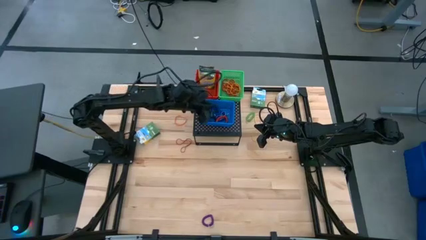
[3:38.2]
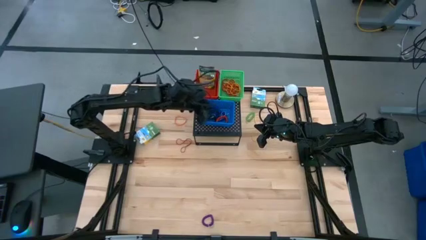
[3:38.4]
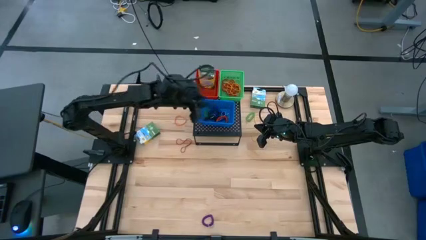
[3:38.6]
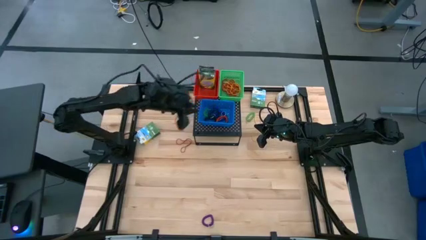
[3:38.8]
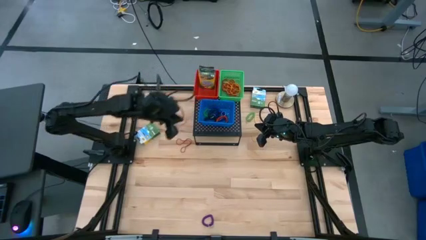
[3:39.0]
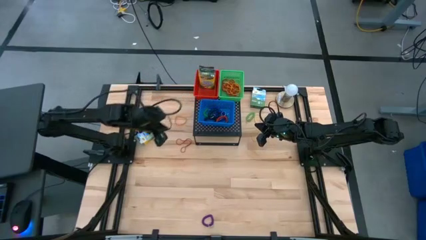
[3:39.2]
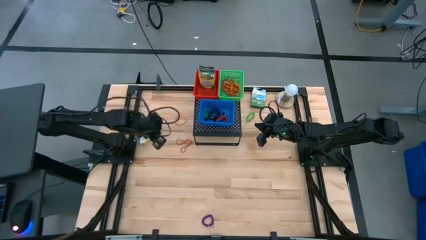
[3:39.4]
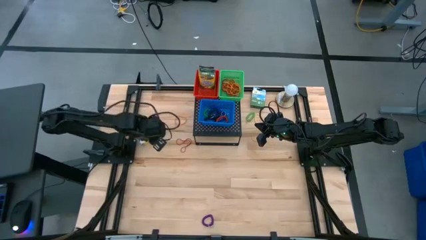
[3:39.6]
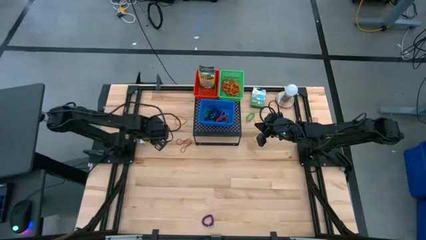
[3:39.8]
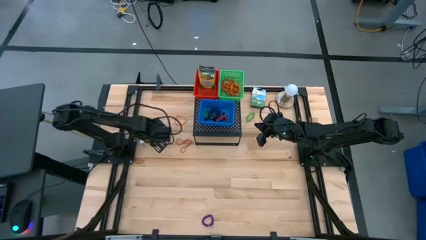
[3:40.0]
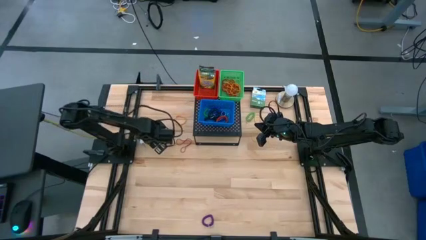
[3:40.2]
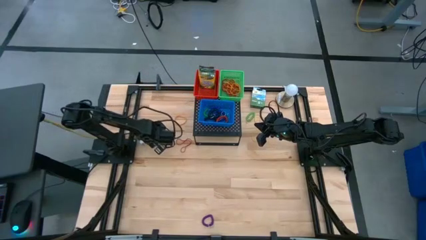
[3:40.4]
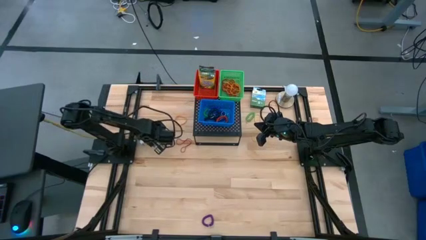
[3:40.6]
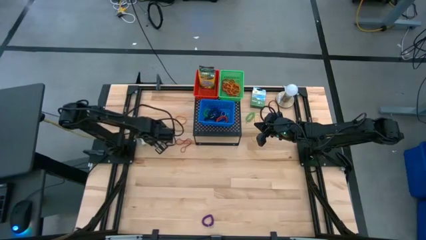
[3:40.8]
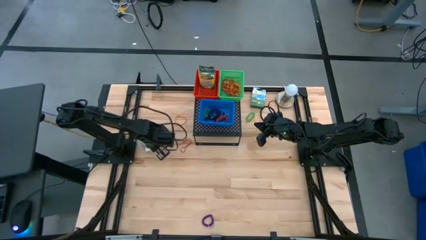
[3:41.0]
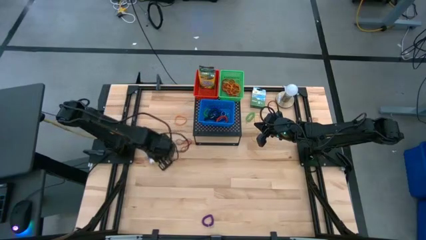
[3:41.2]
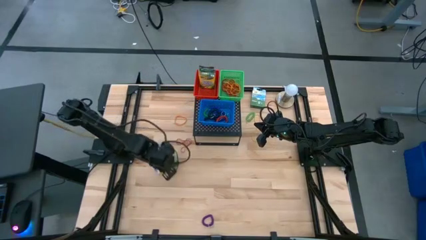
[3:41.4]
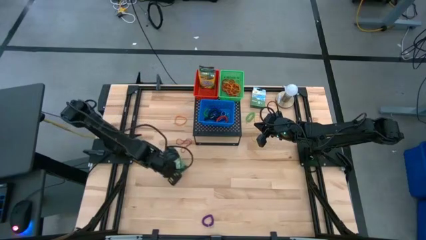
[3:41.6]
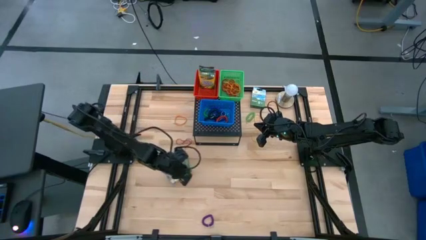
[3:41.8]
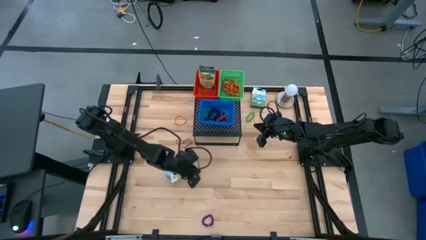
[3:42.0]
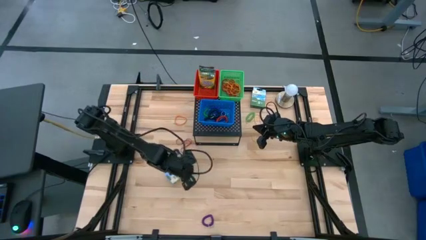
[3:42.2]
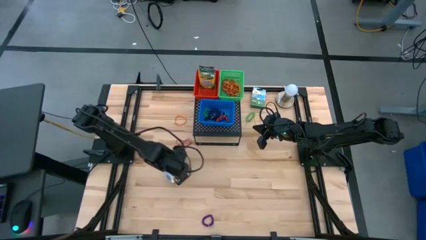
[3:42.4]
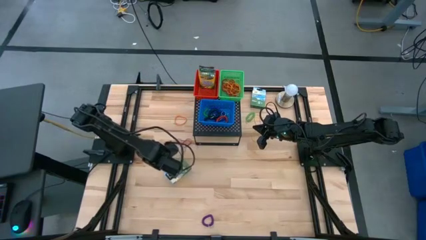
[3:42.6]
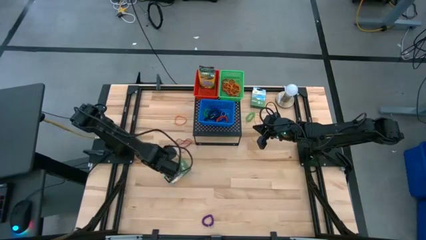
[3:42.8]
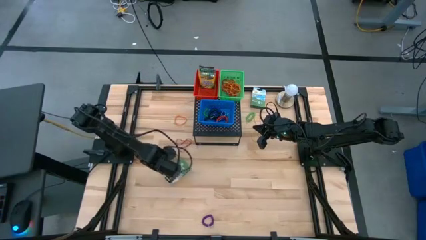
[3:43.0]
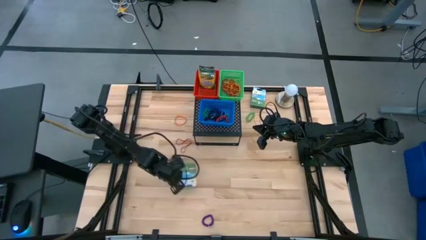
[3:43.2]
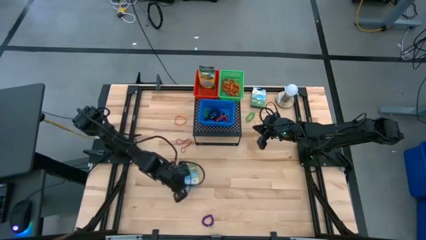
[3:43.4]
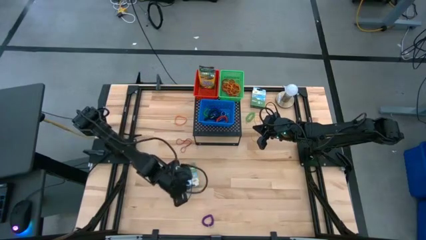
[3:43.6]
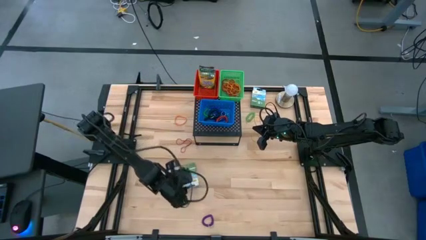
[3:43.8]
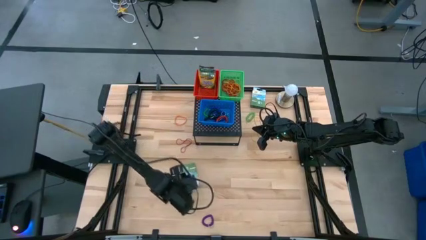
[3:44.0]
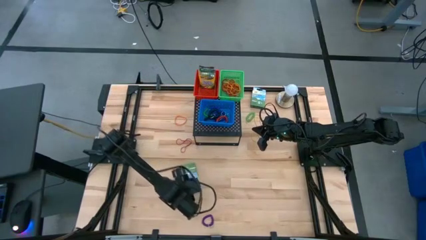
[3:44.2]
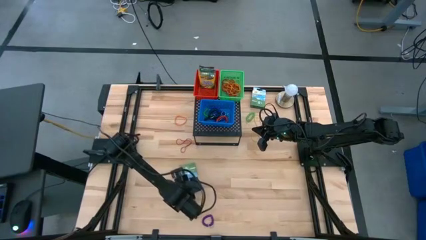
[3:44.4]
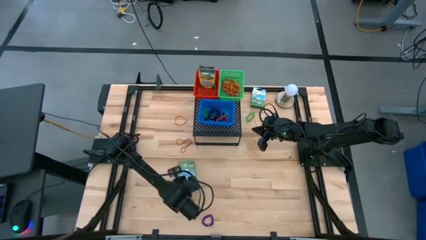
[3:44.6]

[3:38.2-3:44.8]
Task: Pick & Place Office Desk Supplies
Put the yellow crayon box into the red bin on the shelf

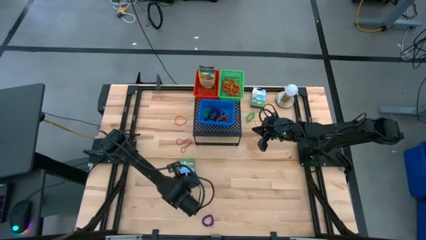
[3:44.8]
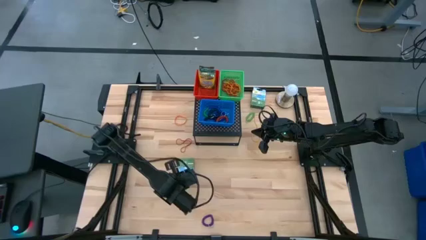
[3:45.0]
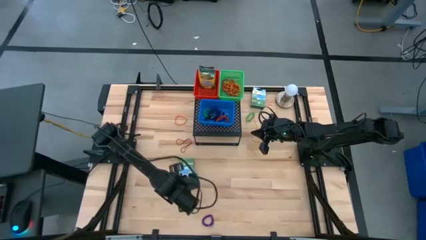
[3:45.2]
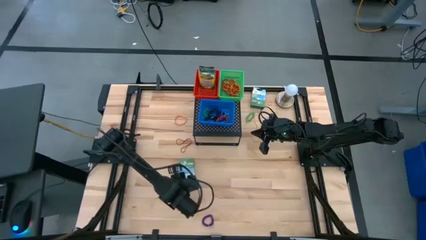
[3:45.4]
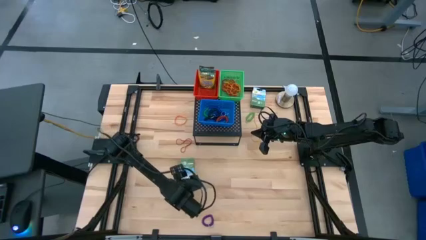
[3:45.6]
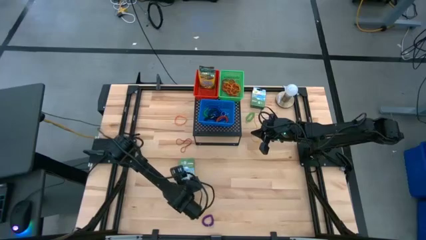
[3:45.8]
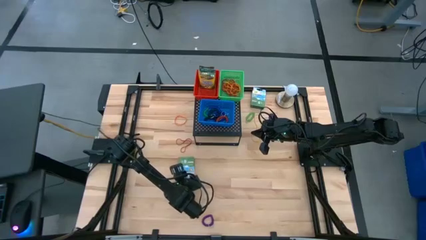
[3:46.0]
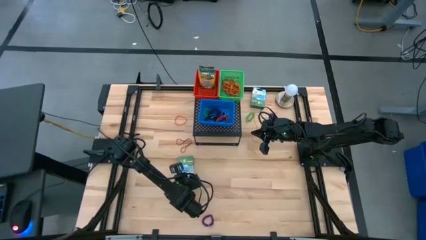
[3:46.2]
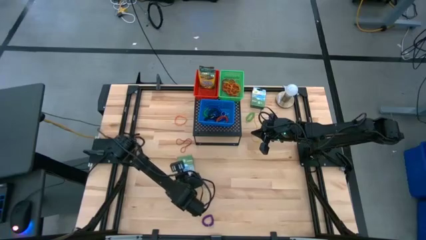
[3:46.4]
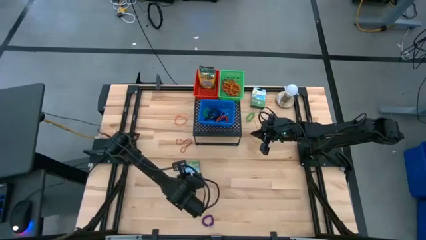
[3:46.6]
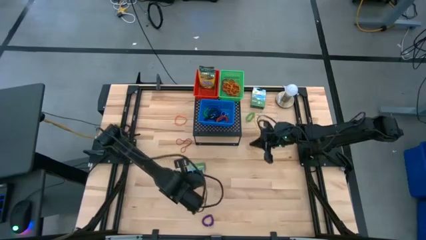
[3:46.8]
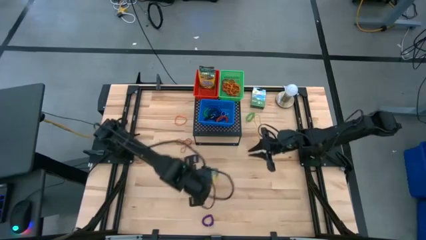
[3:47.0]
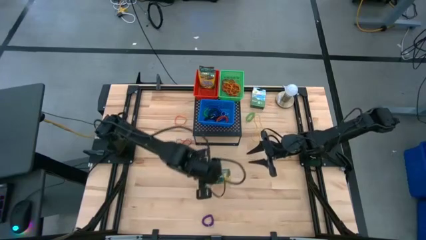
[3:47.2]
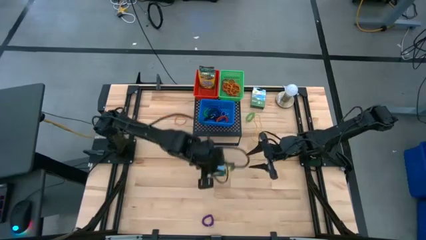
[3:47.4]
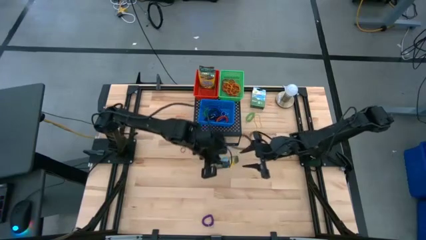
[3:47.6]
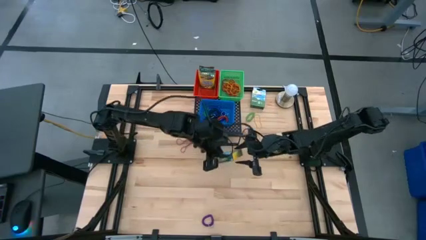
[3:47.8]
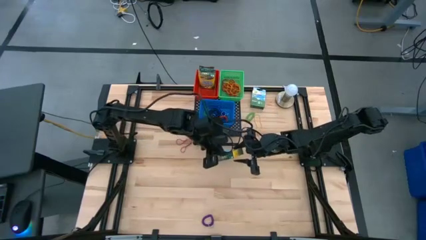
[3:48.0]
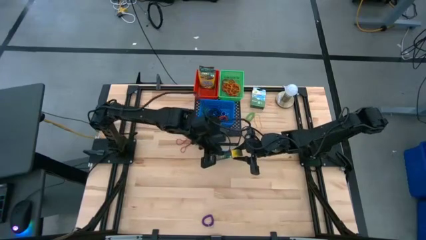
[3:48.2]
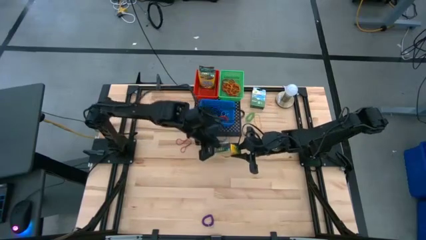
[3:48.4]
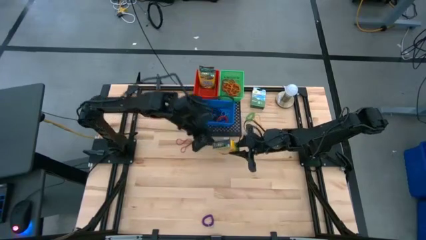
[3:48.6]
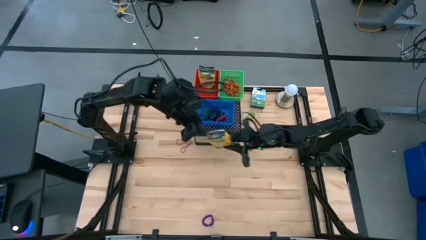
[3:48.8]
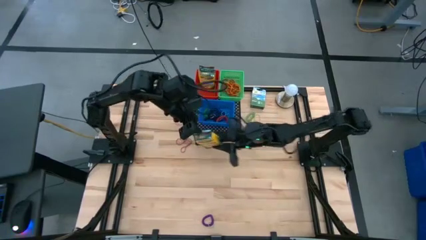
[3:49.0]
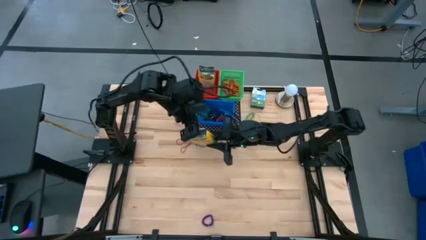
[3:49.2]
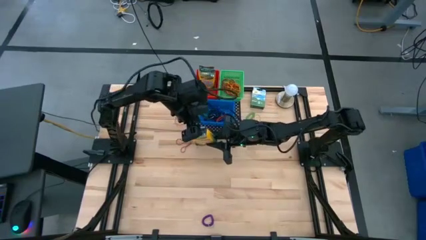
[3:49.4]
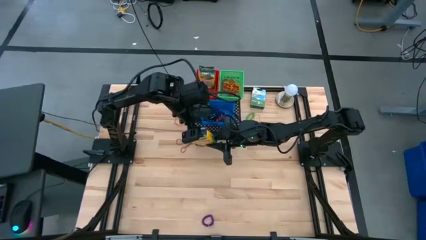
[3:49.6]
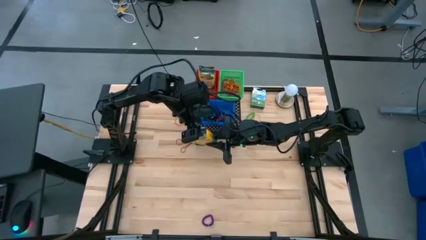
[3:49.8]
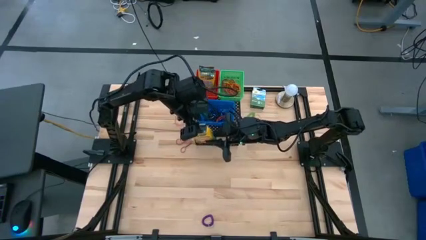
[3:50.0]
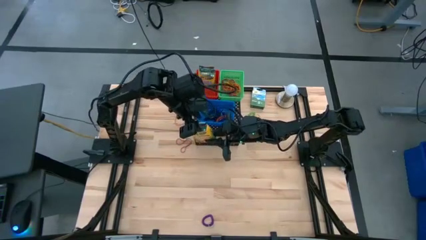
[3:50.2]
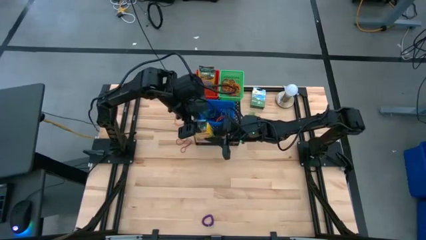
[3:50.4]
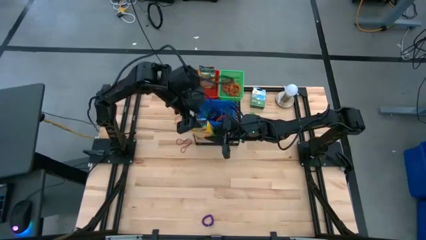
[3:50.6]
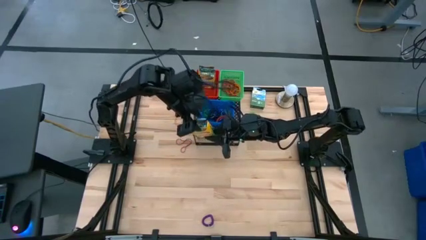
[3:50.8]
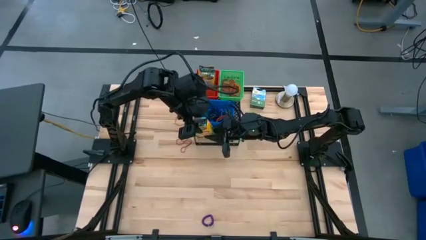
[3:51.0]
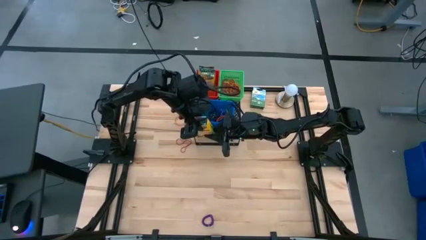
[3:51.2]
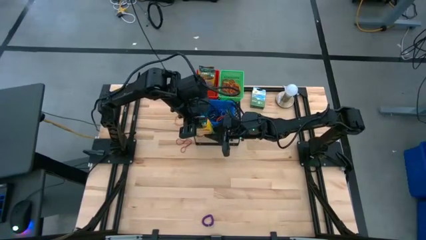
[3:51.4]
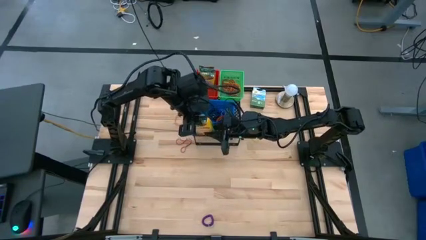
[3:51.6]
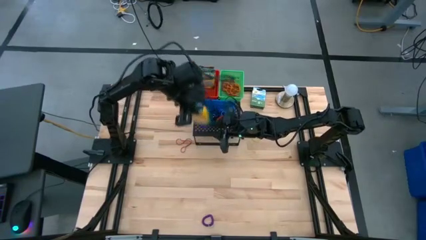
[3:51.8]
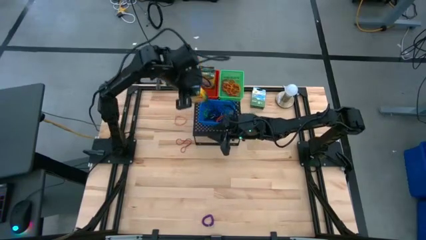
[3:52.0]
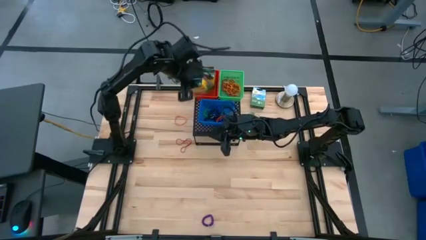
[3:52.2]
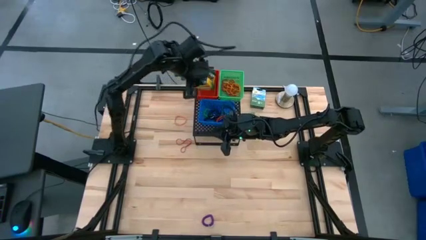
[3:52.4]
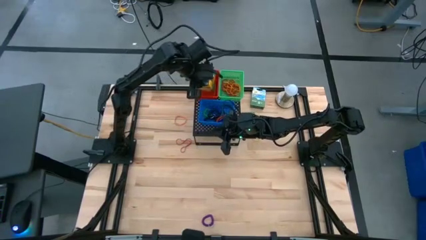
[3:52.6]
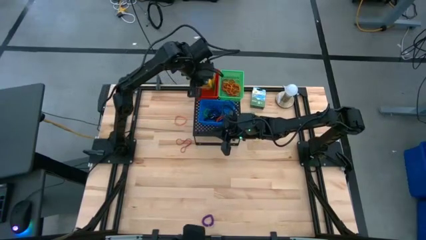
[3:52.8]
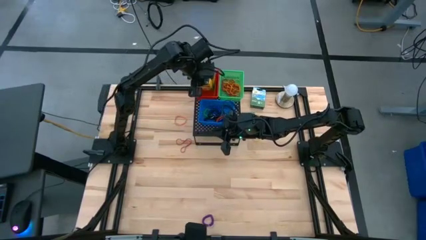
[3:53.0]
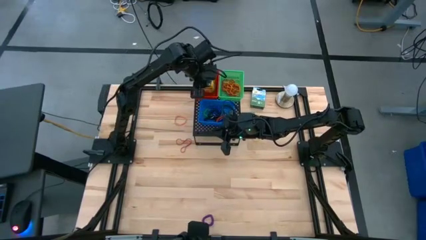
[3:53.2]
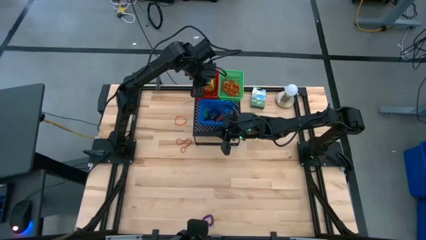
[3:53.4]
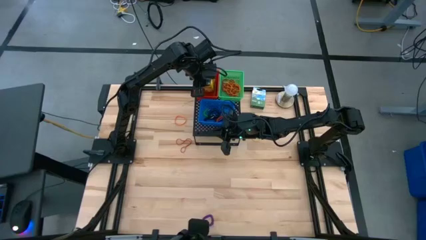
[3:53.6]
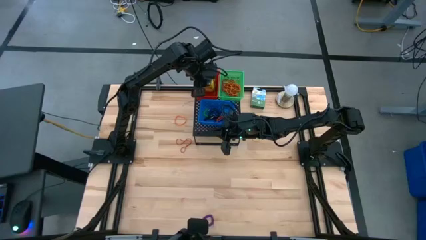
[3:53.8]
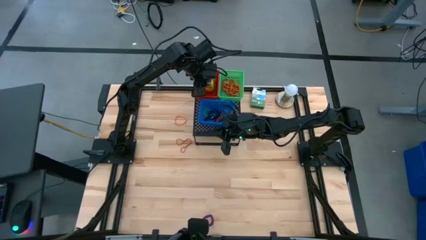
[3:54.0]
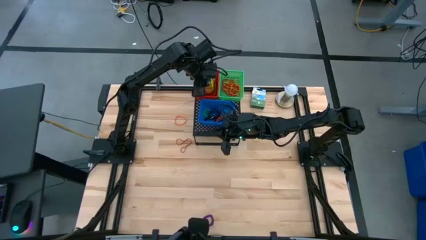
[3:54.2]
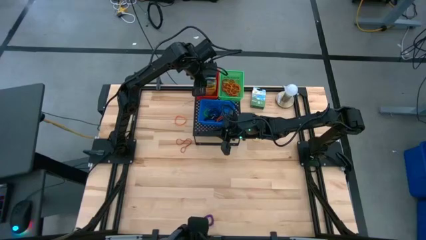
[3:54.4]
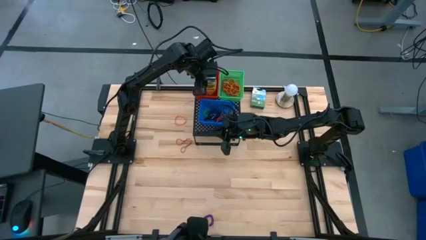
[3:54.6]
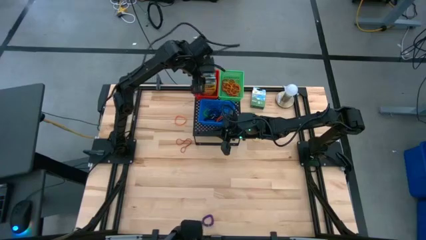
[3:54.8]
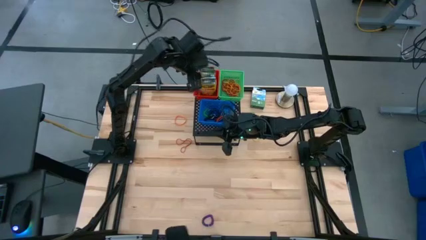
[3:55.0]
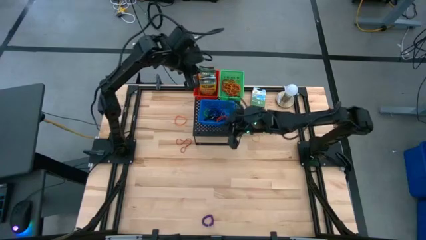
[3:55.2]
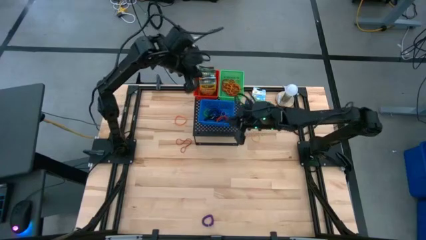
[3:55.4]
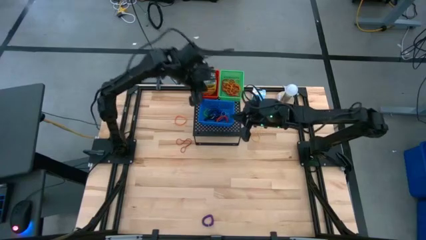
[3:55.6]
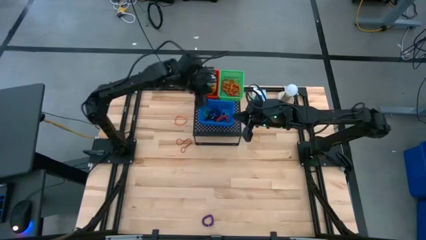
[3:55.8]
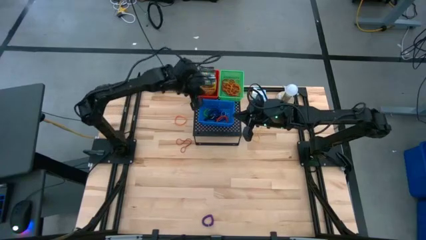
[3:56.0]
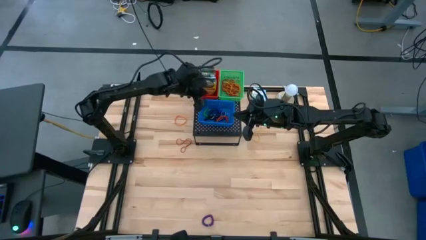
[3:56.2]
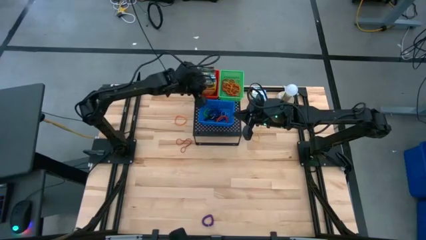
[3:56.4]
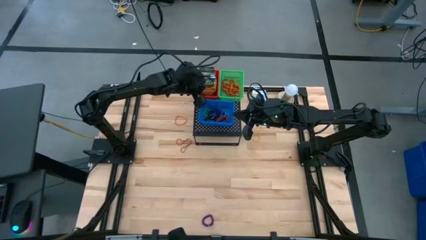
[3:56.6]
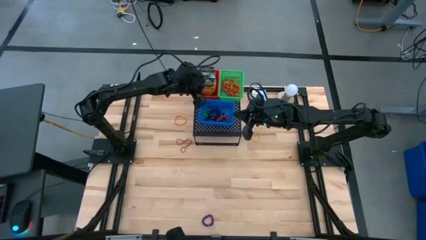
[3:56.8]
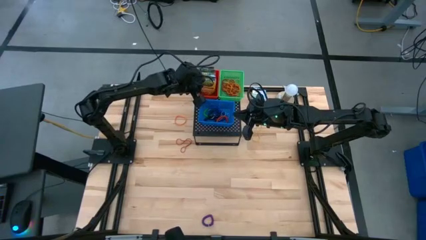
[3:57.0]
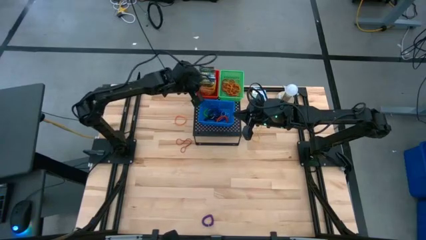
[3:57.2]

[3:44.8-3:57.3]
Put the yellow crayon box into the red bin on the shelf
